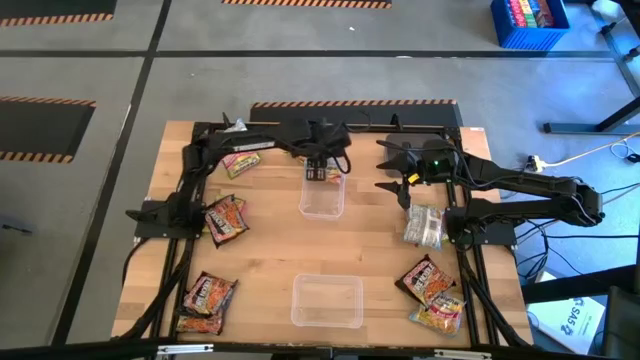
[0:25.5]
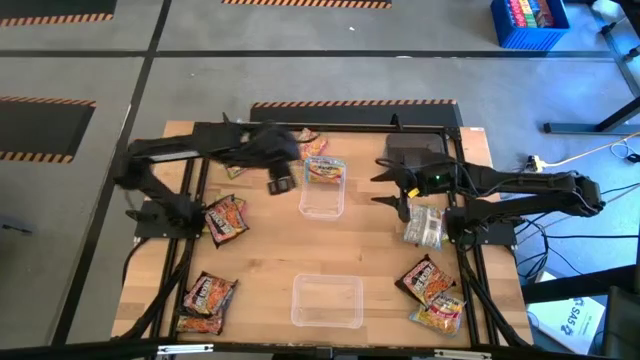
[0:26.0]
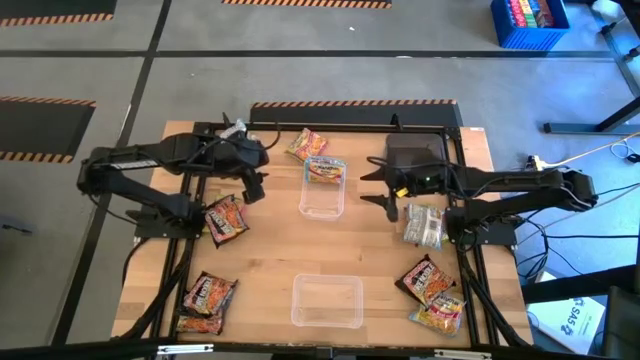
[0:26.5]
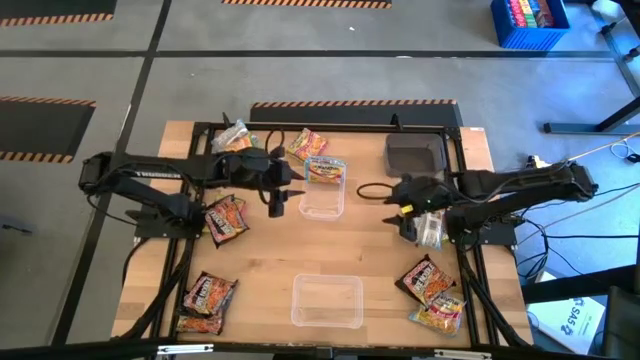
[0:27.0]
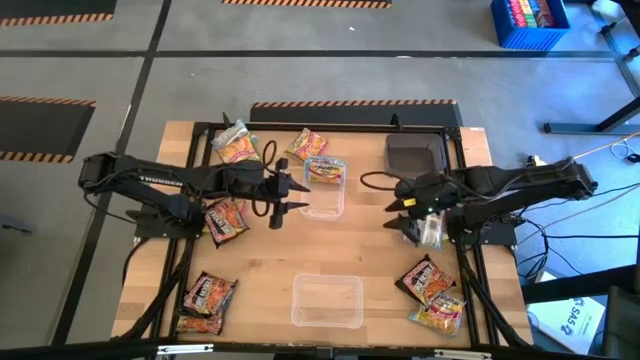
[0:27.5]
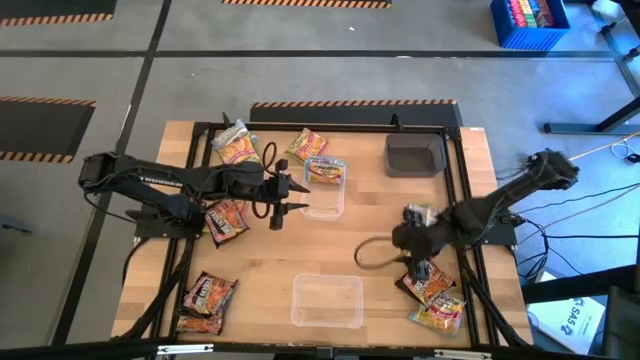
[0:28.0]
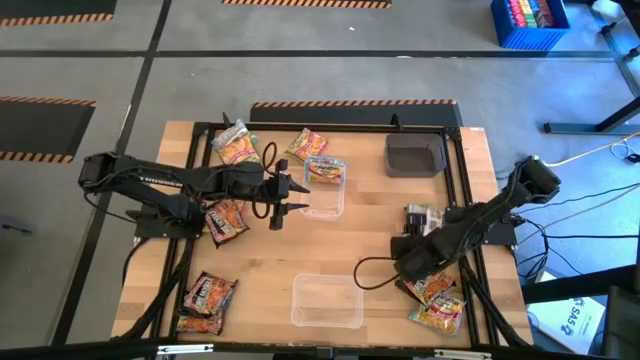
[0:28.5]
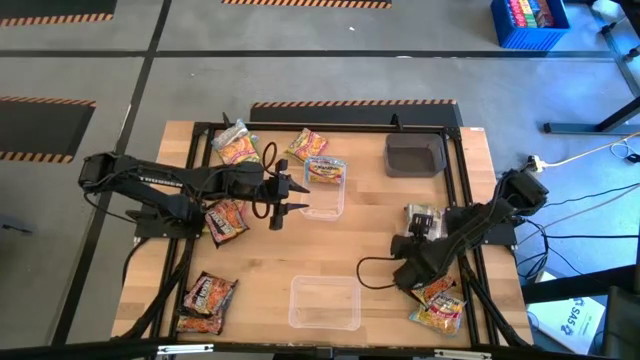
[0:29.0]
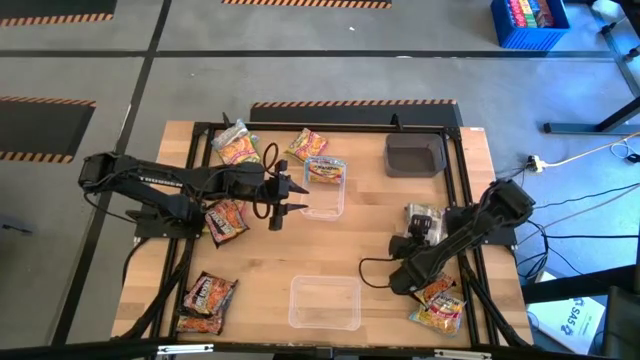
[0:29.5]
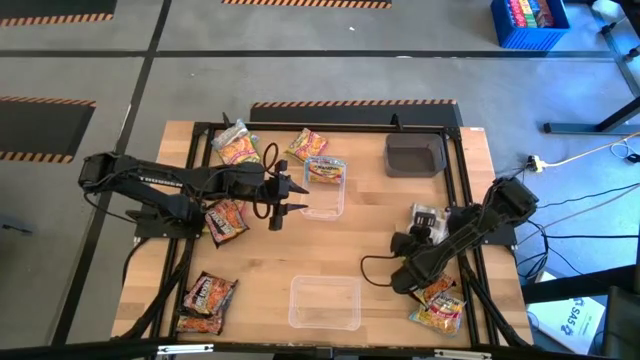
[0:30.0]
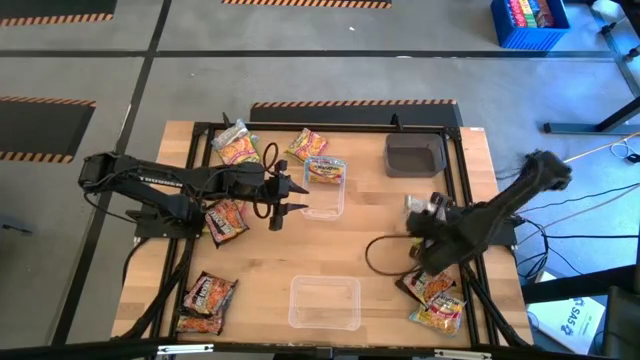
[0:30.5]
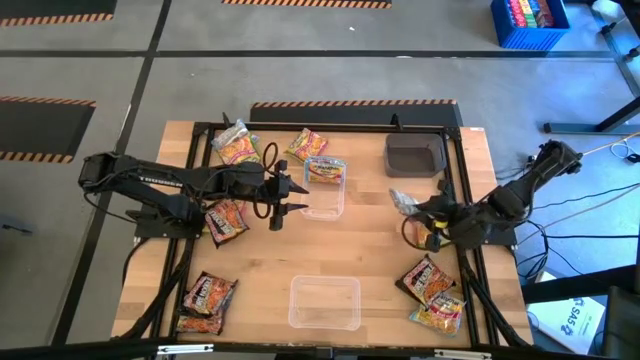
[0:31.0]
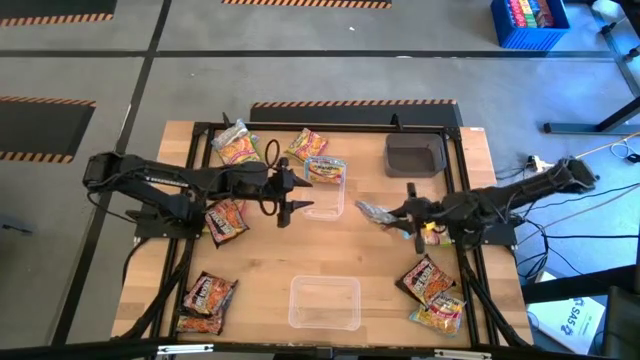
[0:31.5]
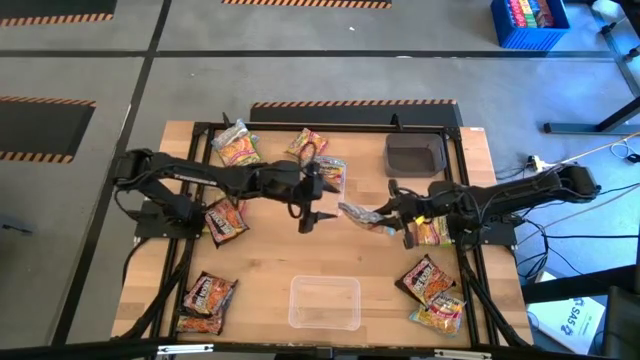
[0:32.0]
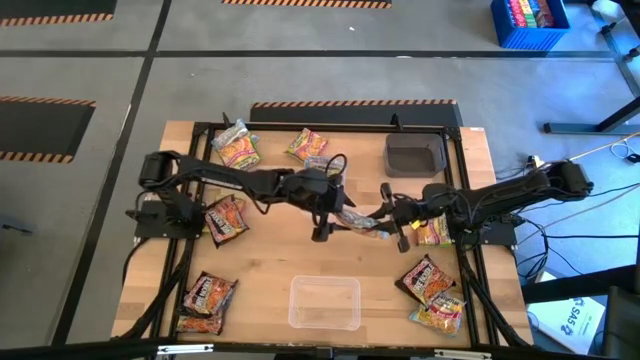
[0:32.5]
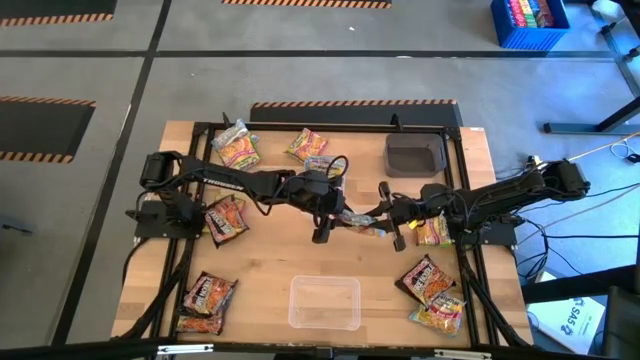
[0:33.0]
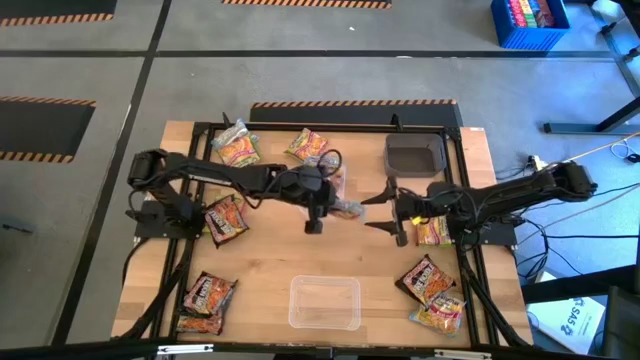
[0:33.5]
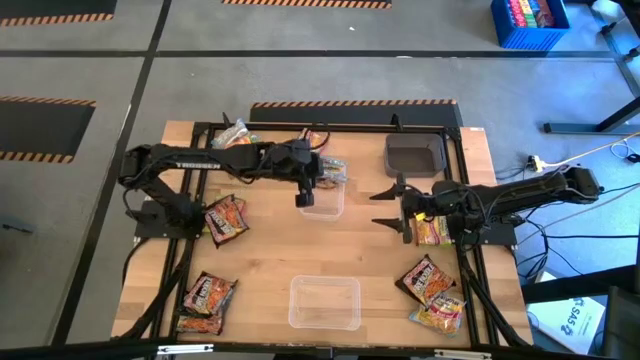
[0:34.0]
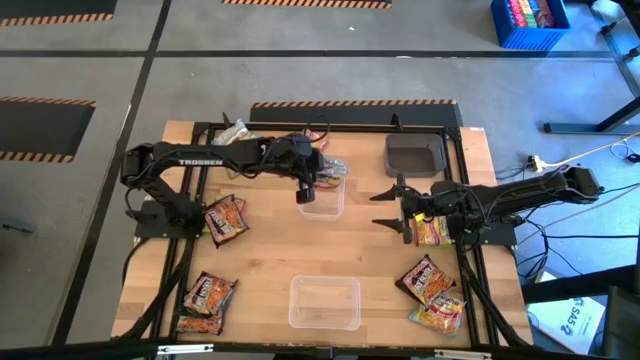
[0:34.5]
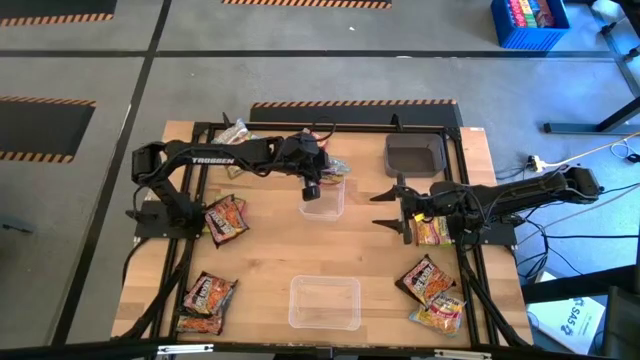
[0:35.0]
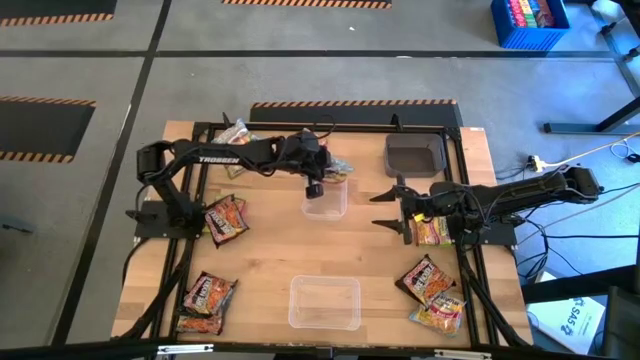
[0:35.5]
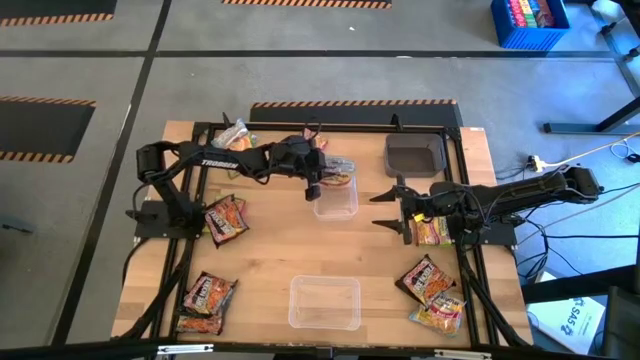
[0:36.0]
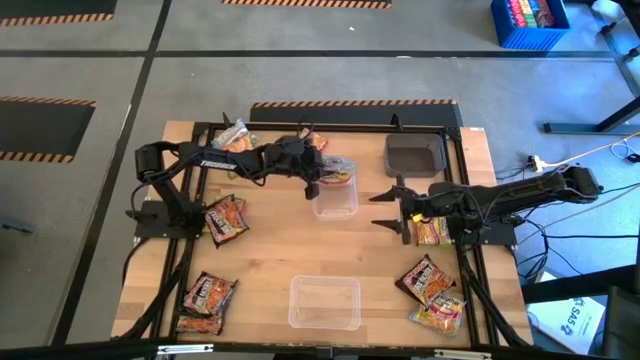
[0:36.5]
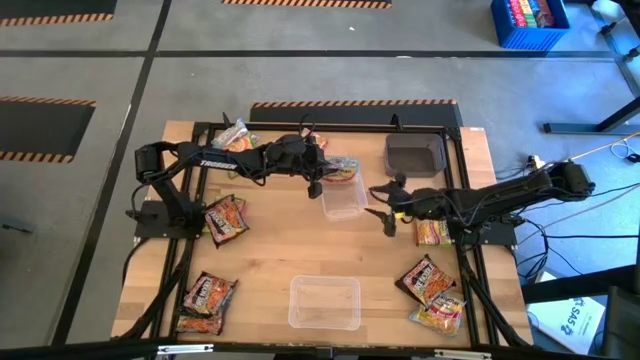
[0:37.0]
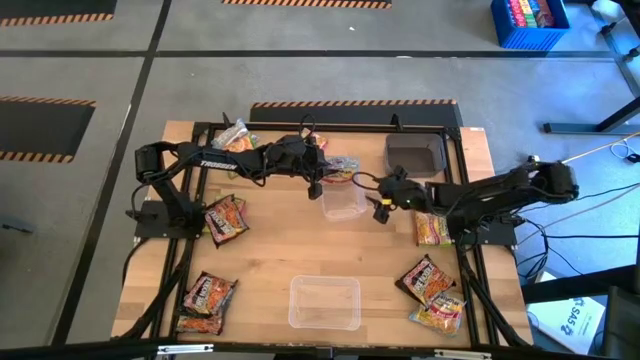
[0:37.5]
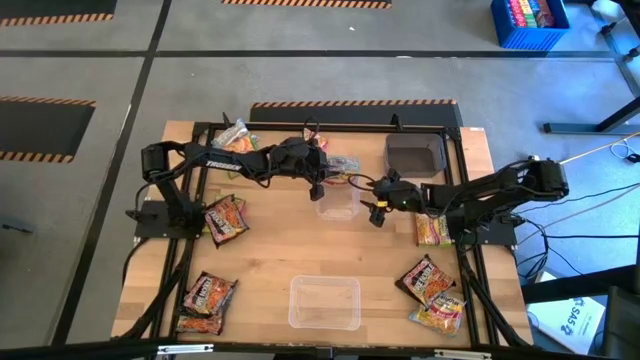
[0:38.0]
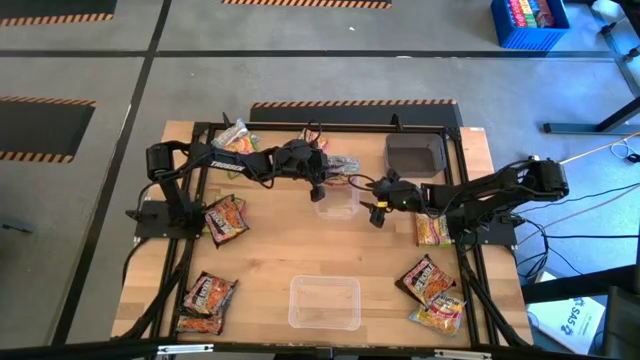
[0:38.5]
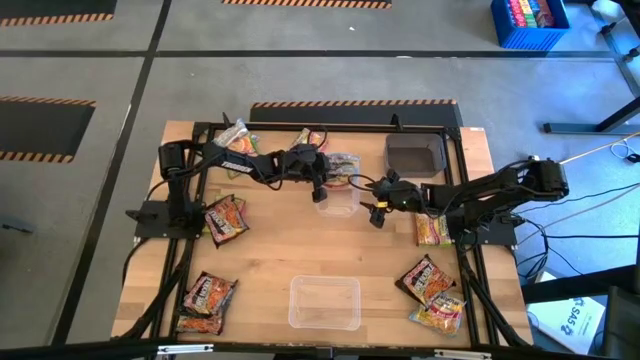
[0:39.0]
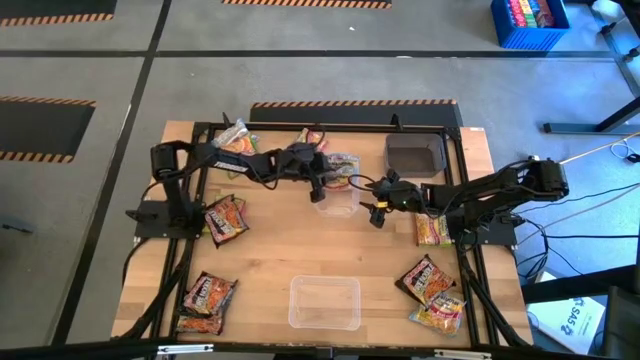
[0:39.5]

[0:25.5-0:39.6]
Task: Sort Maruchan noodles
Put the middle blue noodle pack into the top transparent bin

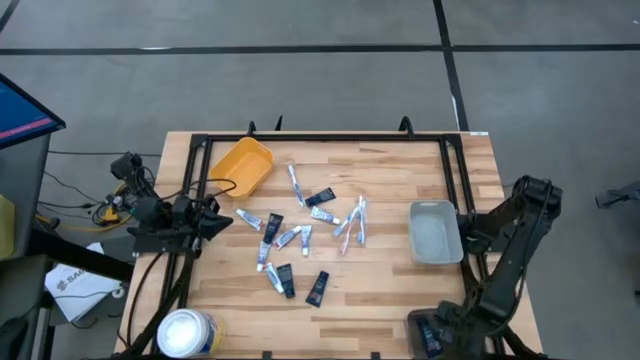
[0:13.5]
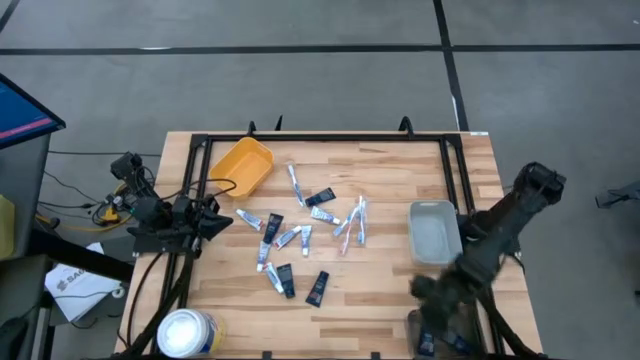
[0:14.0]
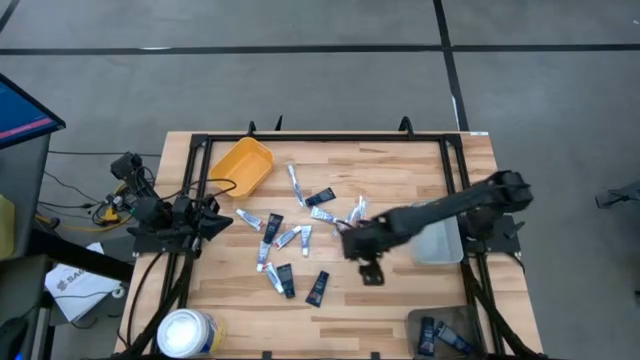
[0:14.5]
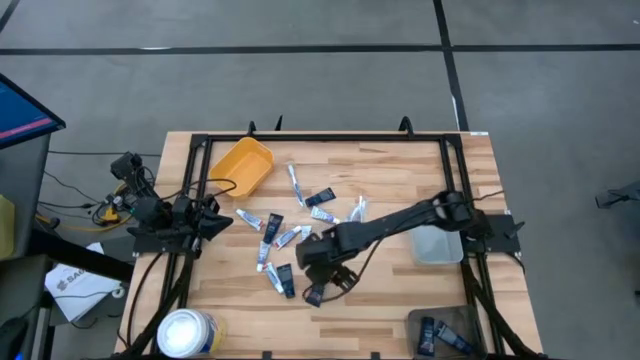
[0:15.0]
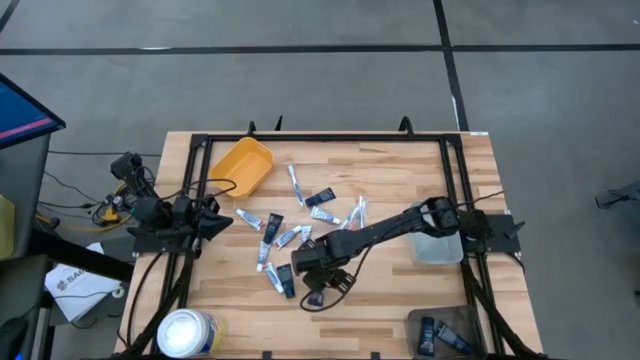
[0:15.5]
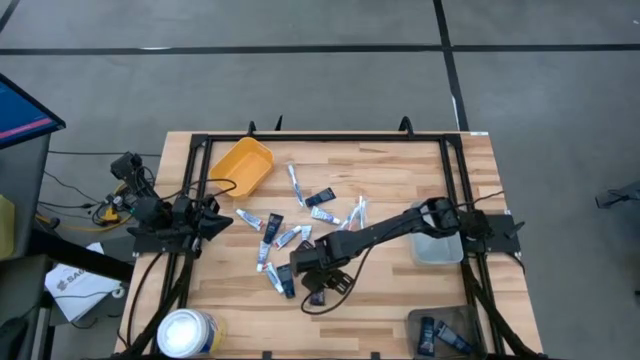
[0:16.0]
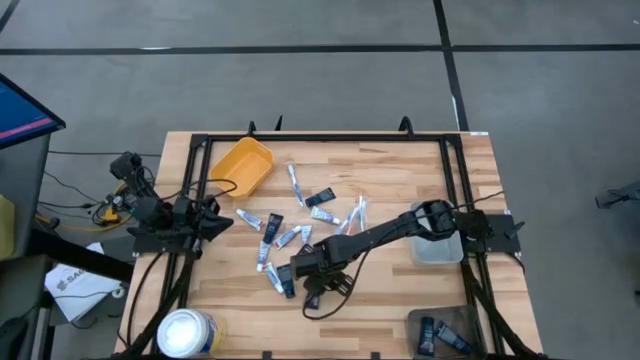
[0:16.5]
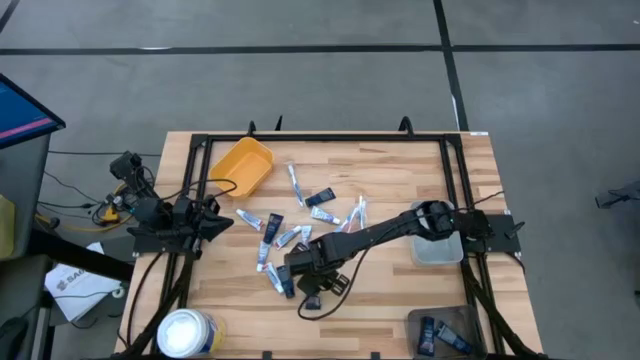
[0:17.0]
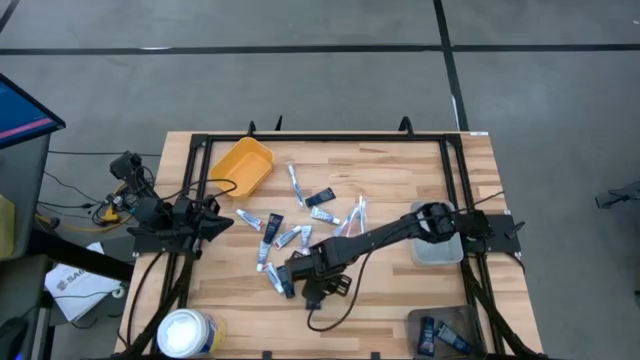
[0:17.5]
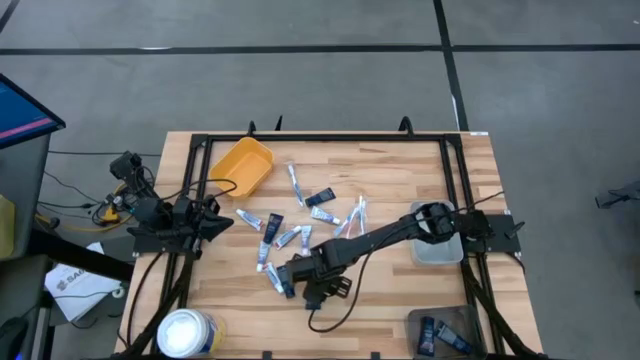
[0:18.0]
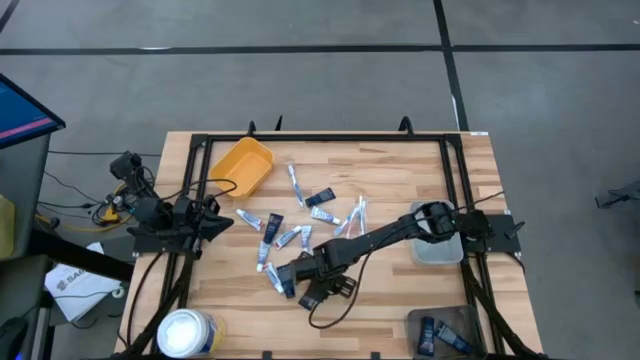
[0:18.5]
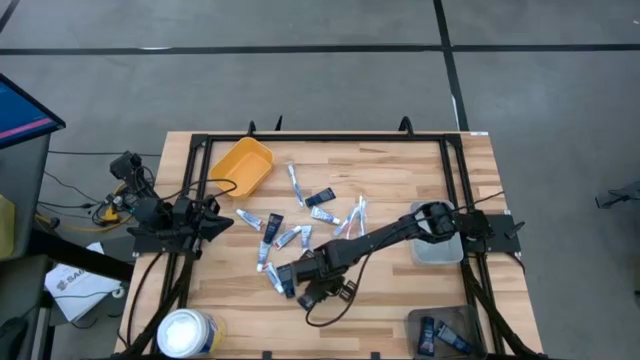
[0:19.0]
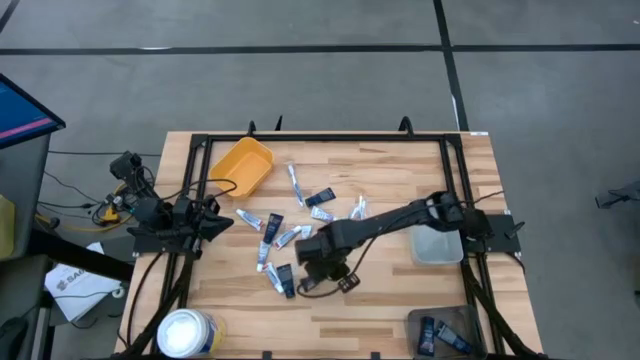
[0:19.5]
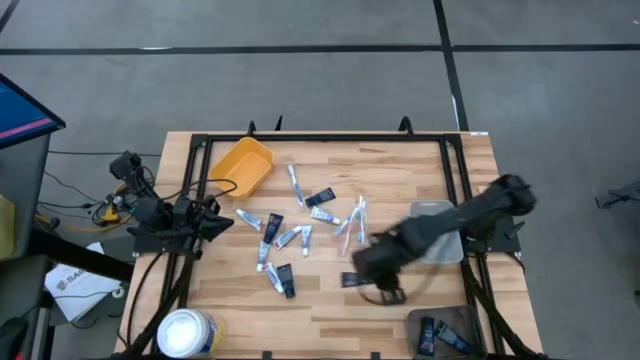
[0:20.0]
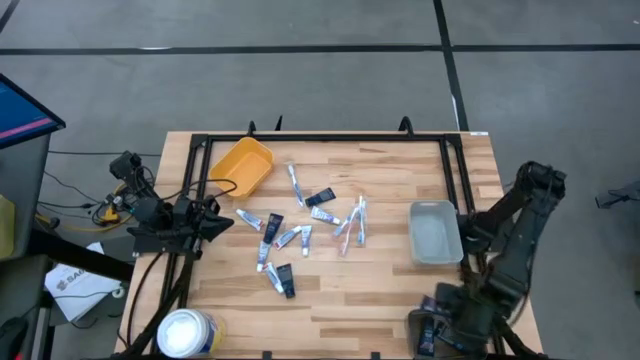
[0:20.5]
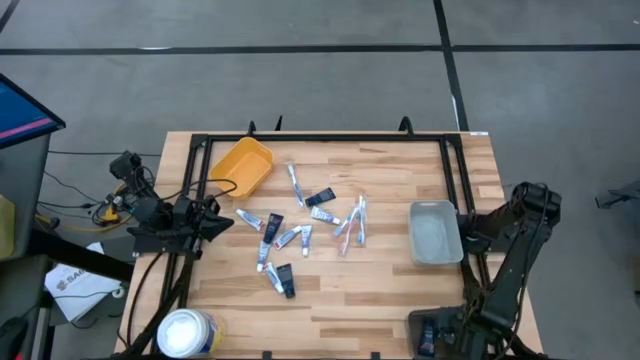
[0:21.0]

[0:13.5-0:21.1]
Task: Pick & Place Travel size toiletries
Put the blue shave cream into the black bin
